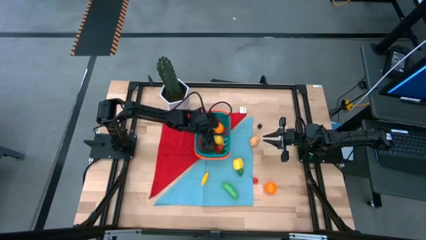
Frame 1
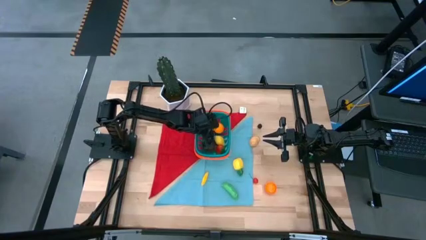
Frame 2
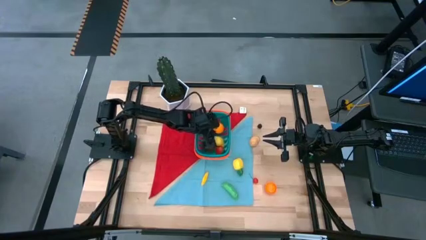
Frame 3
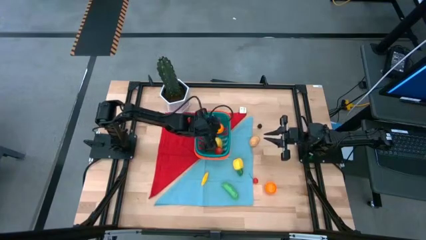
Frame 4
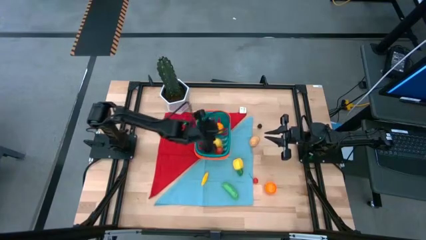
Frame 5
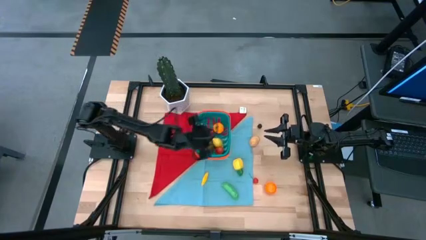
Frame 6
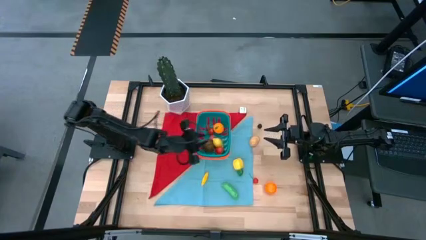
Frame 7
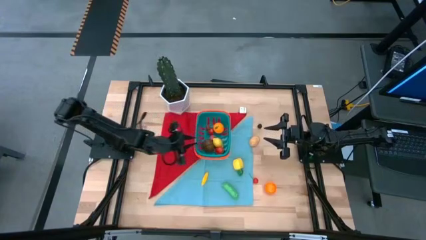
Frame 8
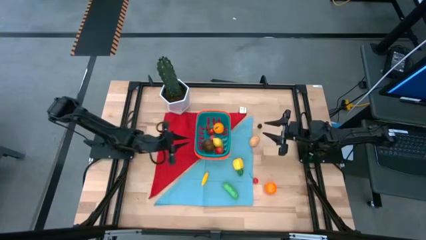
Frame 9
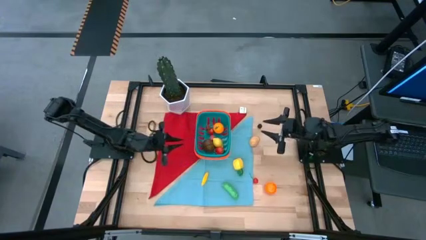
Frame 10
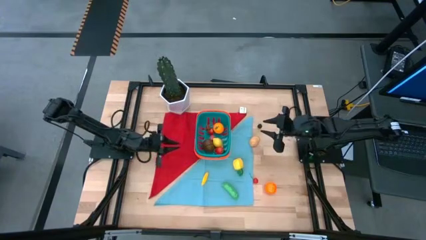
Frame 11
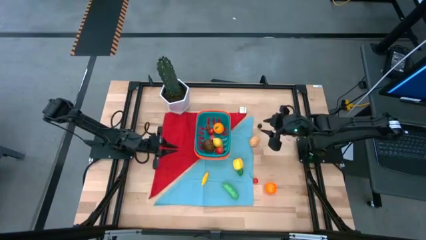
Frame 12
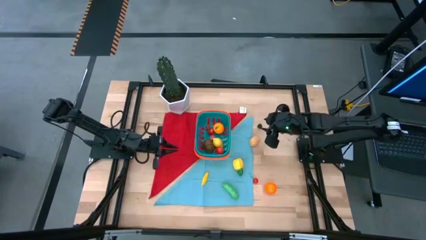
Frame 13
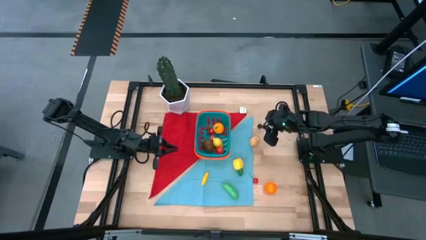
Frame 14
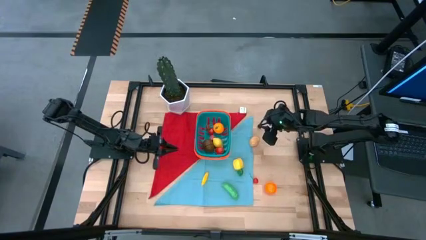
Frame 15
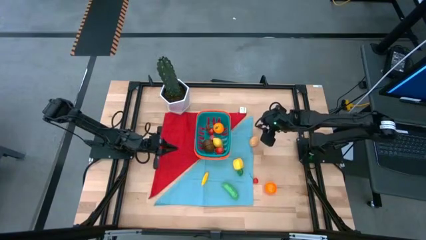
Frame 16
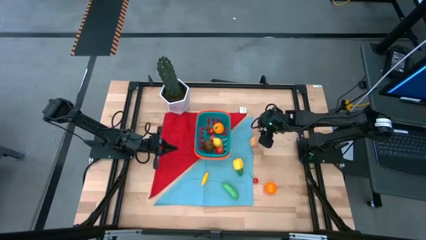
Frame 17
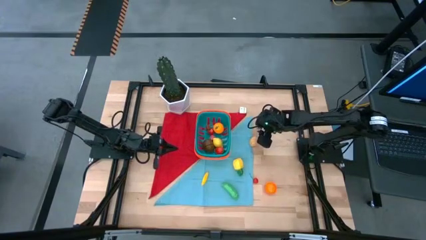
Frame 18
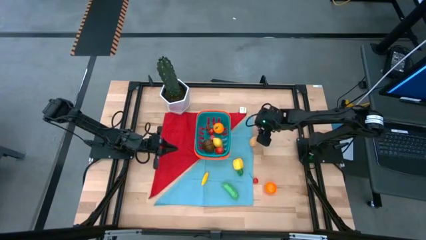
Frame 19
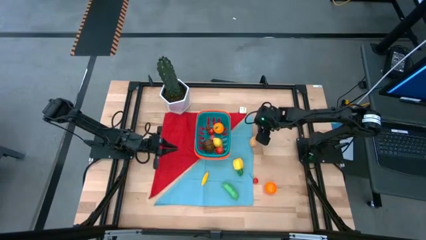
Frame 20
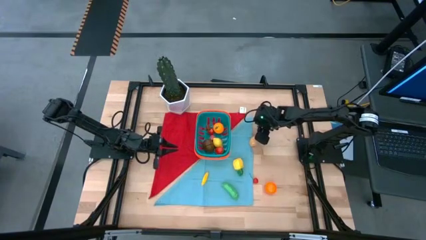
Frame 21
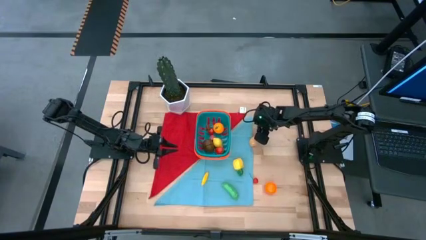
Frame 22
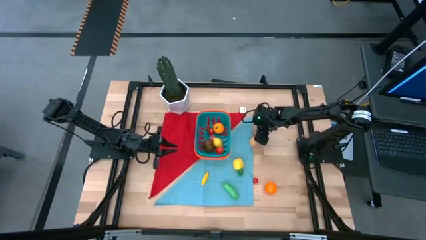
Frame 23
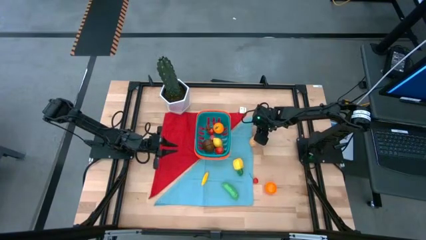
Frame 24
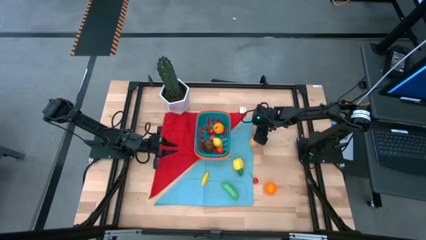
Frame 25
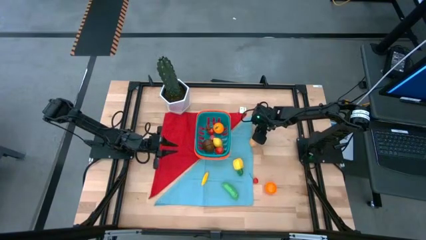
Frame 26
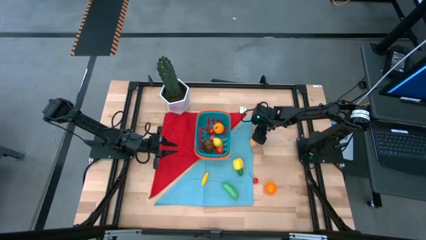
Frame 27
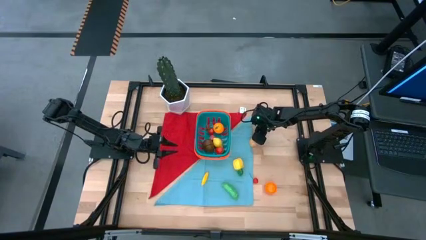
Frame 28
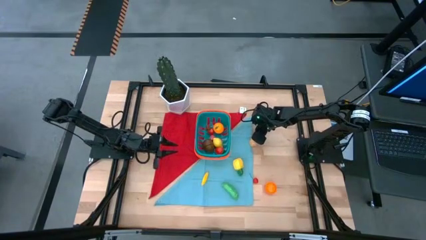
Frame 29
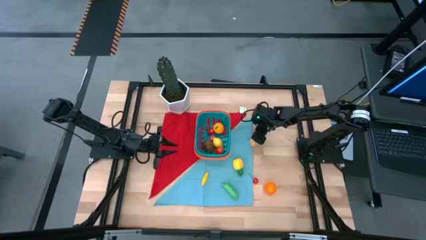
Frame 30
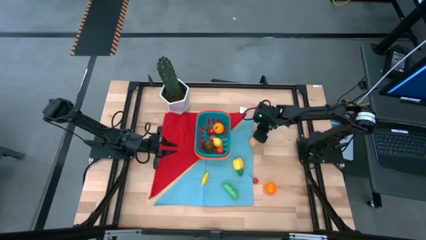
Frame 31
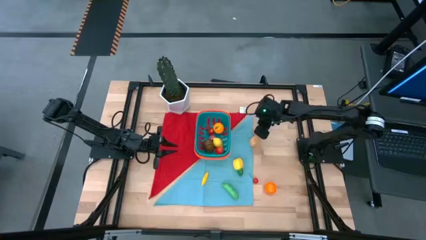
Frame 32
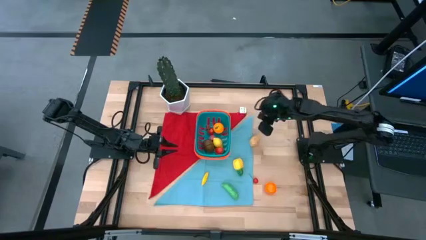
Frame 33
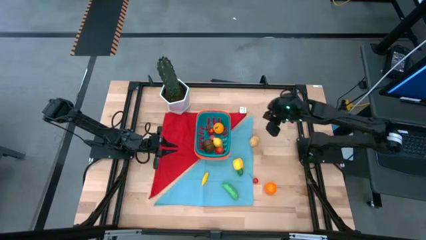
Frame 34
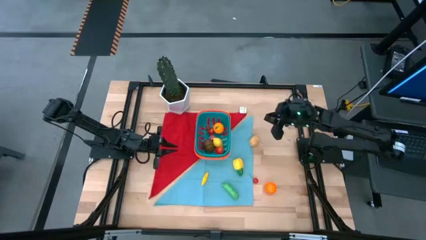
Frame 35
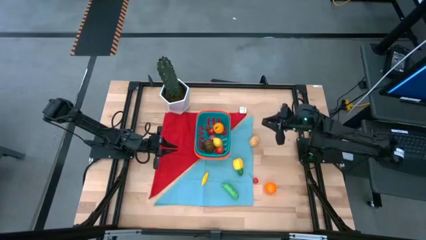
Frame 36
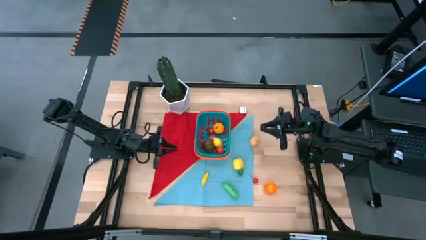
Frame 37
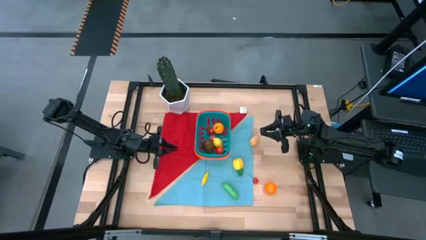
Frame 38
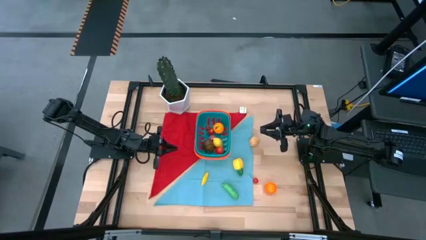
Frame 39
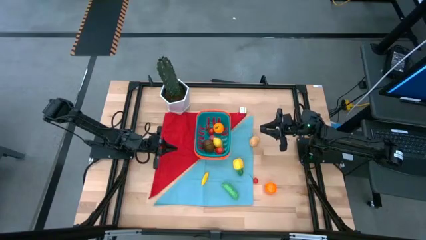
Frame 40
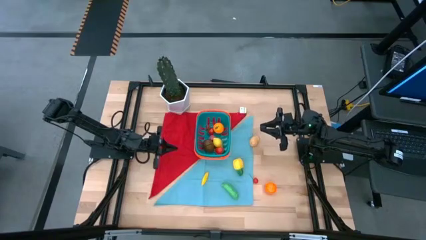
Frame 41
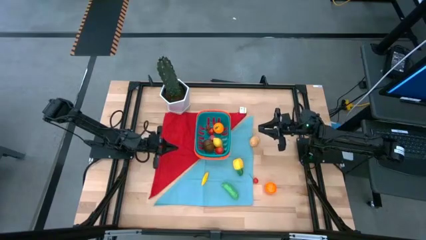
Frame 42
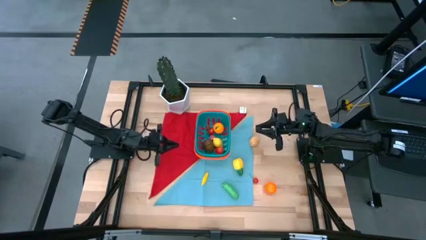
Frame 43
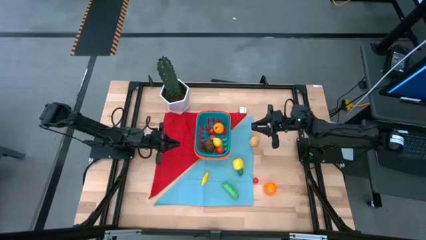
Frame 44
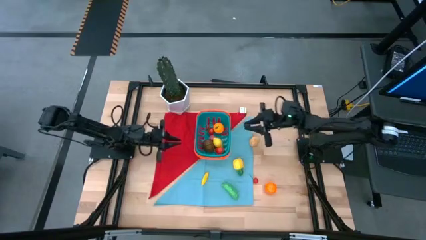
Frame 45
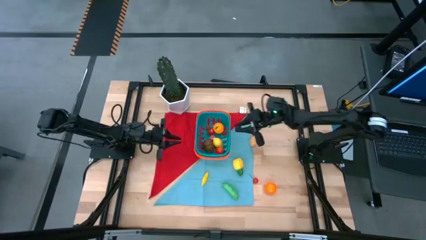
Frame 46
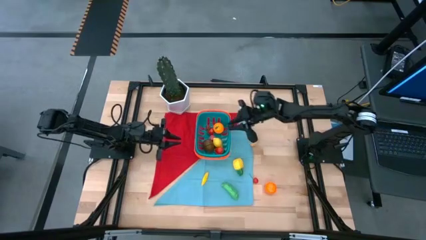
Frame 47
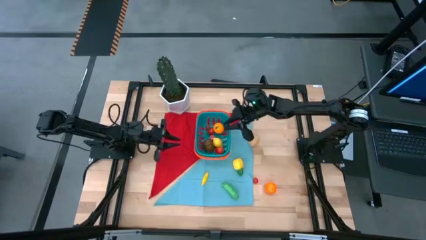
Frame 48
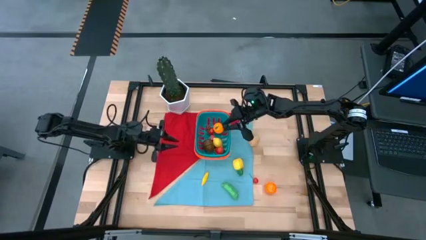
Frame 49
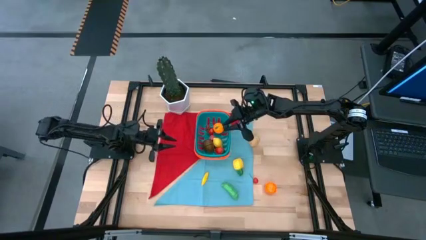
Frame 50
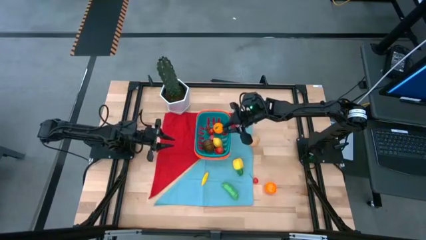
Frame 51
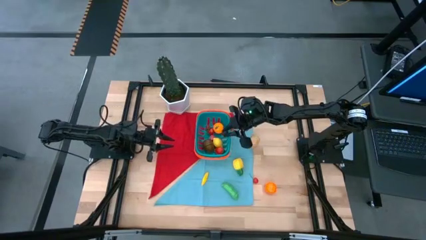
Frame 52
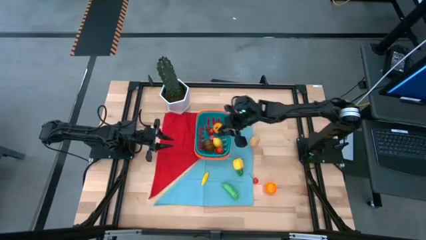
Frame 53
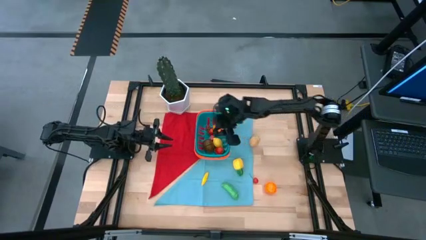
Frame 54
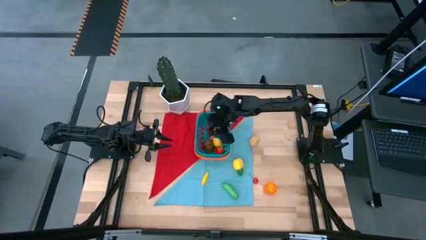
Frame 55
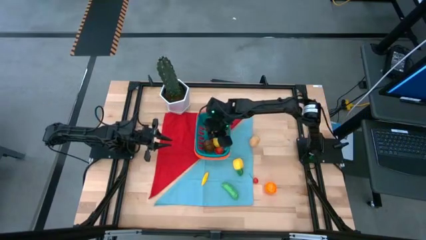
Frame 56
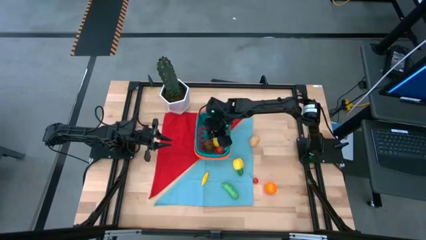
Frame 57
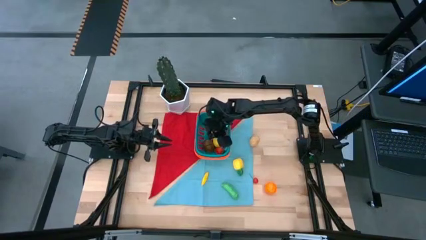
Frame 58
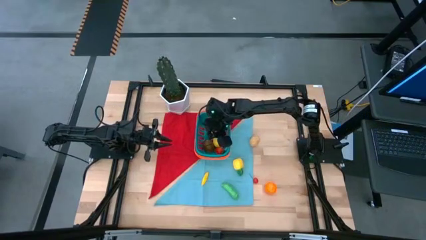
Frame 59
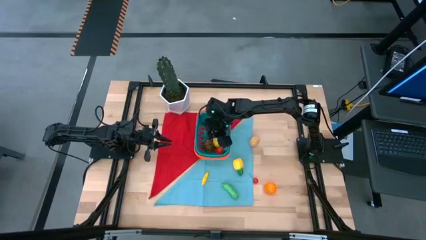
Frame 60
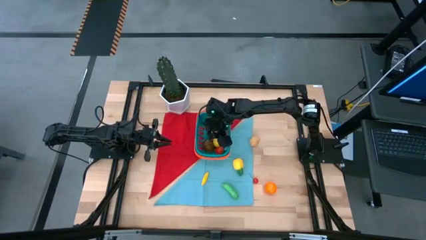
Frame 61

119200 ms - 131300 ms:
Task: Pick and placing Produce into tupperware
Put the blackberry into the basket

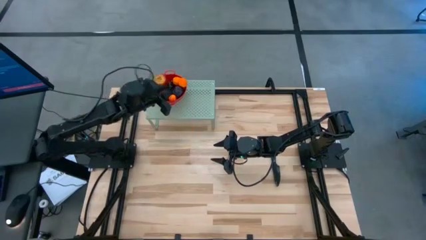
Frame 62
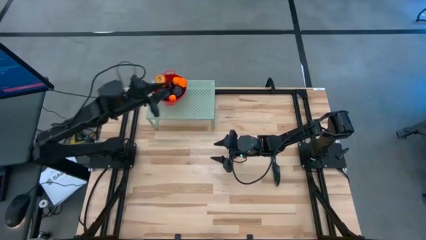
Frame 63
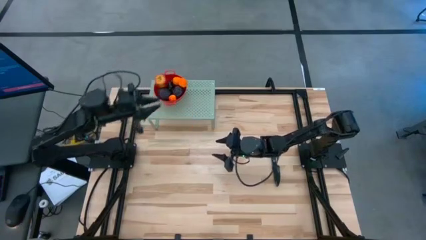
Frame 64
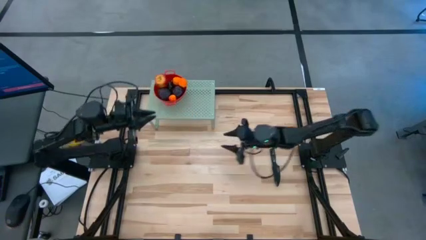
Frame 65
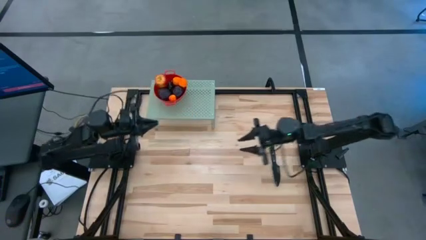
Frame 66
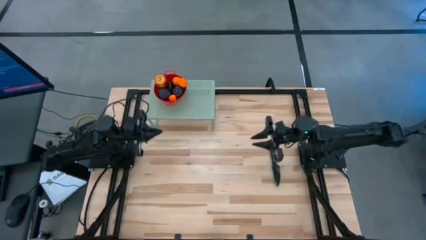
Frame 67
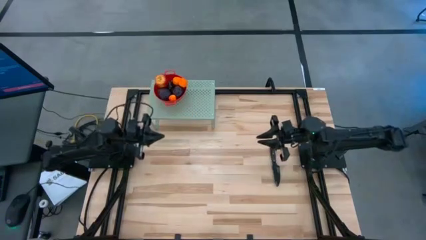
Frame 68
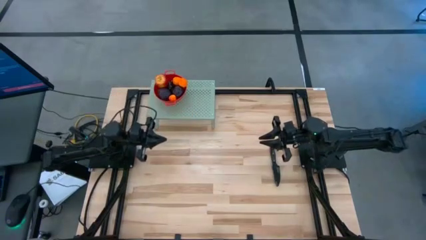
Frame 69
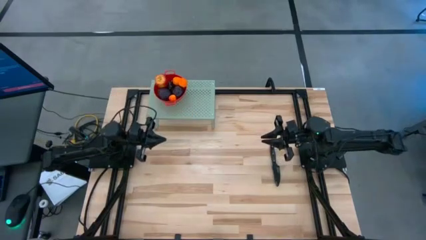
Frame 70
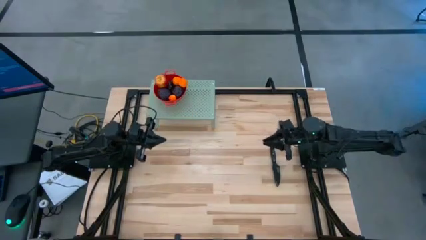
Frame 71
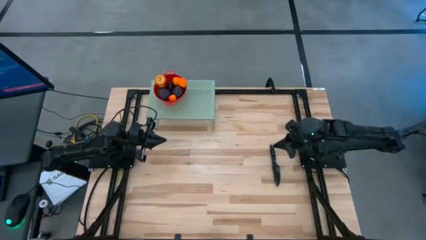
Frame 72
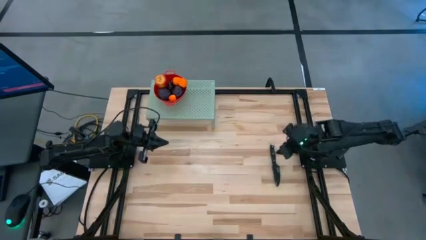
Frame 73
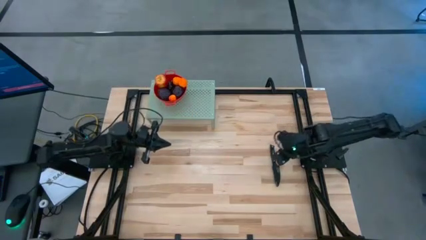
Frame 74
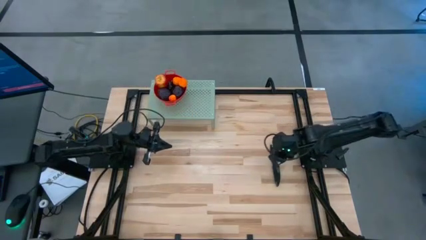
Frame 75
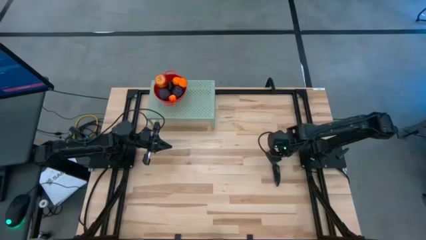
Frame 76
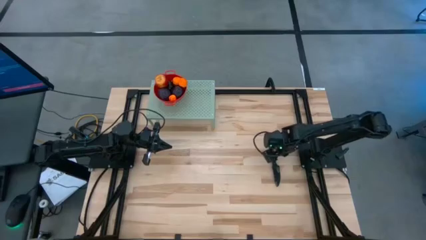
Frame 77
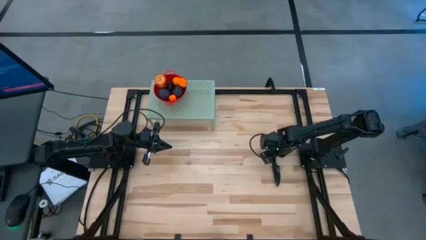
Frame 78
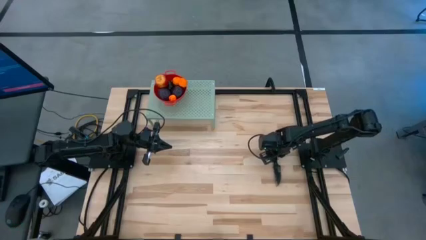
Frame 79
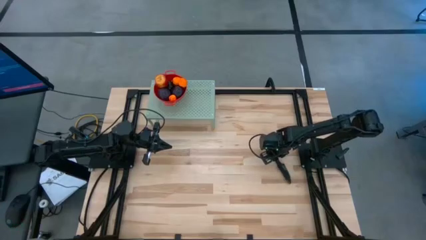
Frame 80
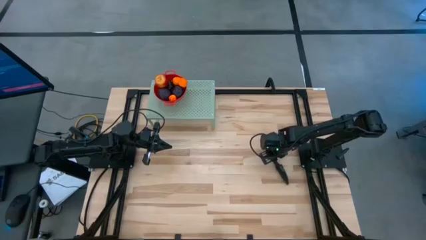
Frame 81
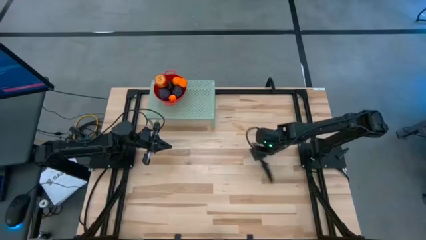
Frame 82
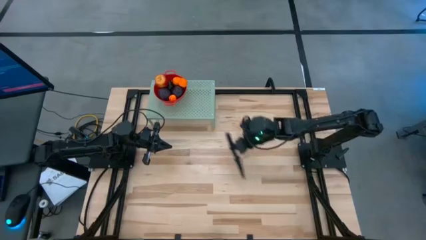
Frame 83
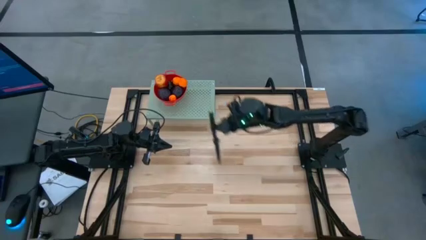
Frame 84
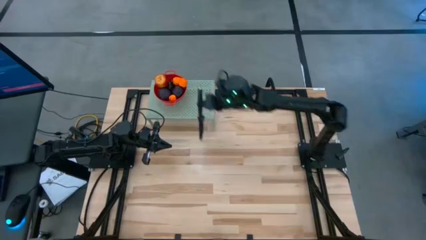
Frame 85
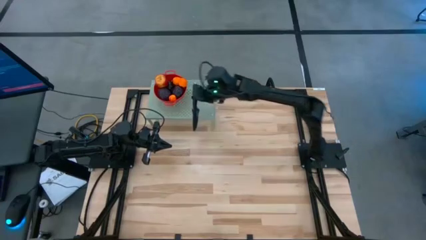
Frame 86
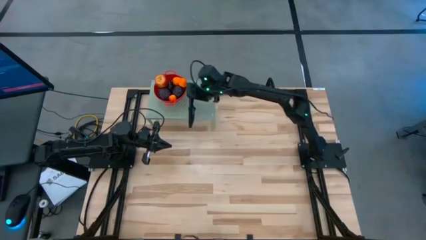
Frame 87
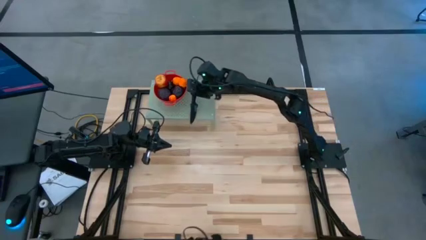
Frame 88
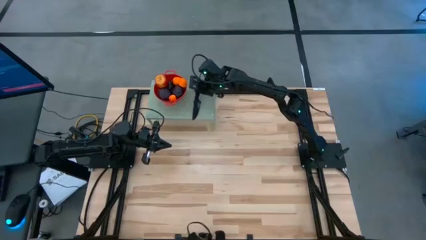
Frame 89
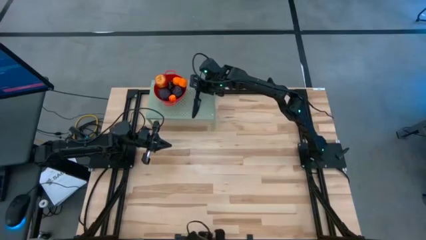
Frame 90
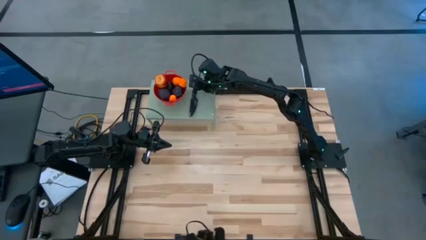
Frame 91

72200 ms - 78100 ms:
Task: Pick & Place Fruit
Put the black knife on the shelf right beside the red strainer bowl
